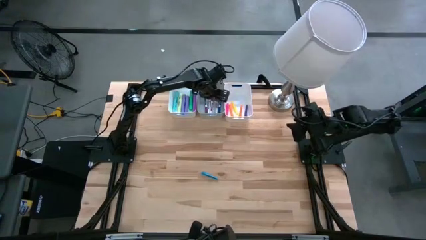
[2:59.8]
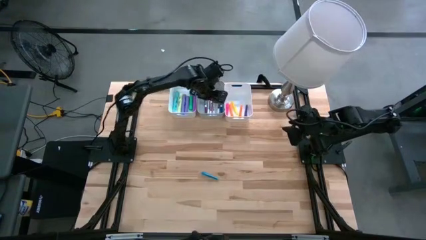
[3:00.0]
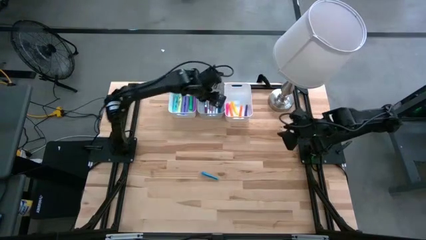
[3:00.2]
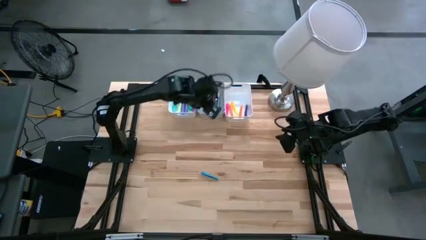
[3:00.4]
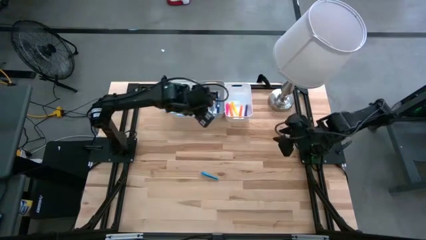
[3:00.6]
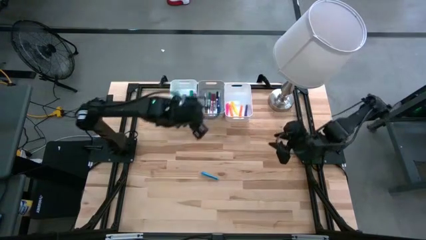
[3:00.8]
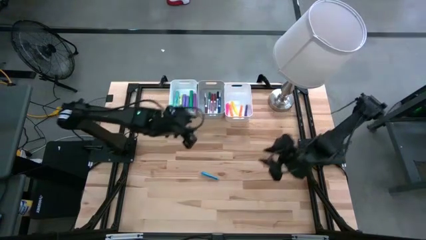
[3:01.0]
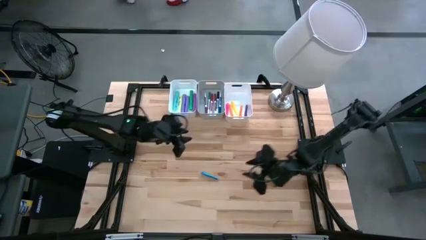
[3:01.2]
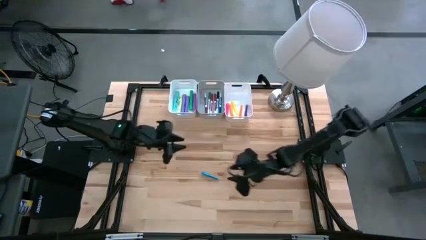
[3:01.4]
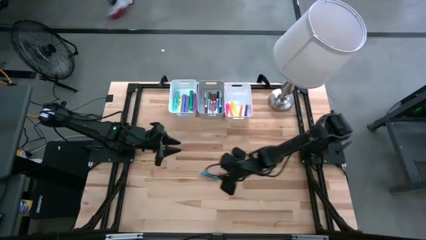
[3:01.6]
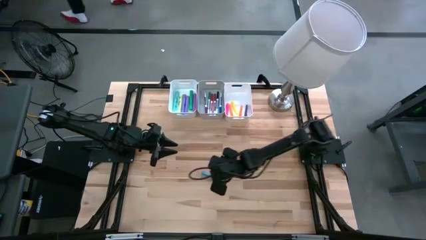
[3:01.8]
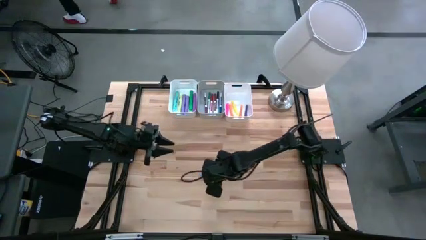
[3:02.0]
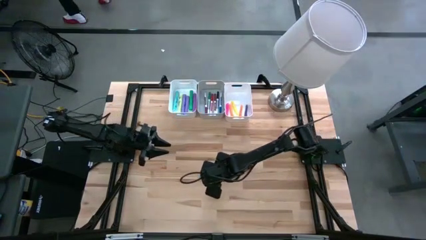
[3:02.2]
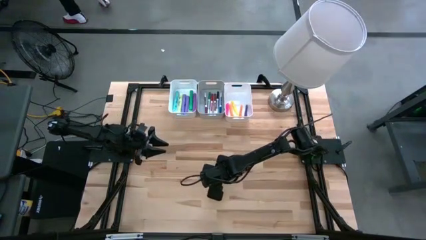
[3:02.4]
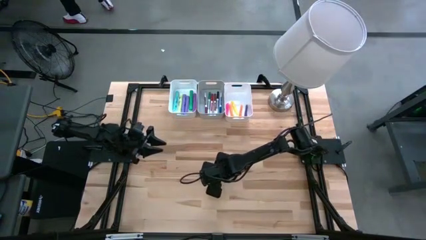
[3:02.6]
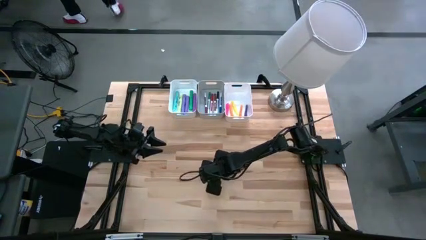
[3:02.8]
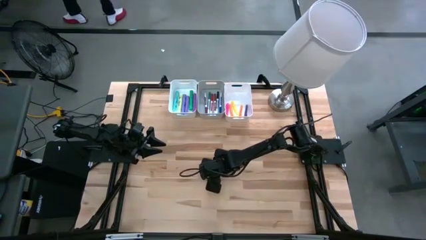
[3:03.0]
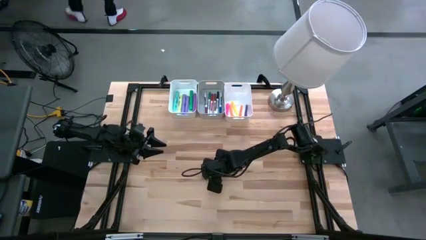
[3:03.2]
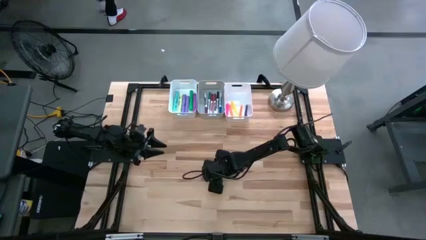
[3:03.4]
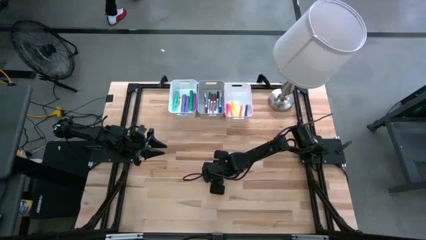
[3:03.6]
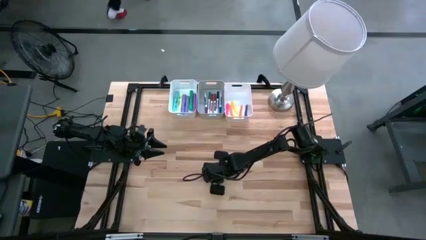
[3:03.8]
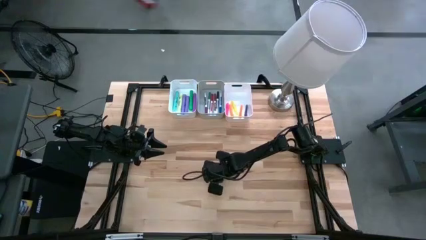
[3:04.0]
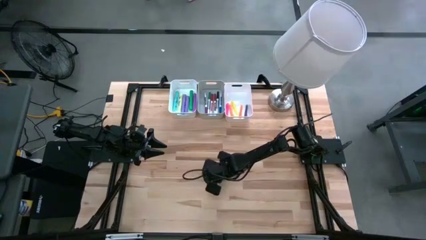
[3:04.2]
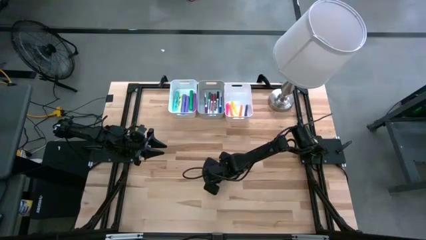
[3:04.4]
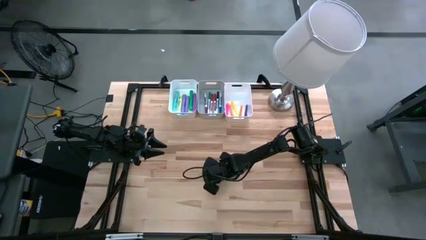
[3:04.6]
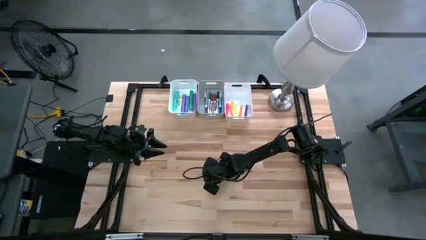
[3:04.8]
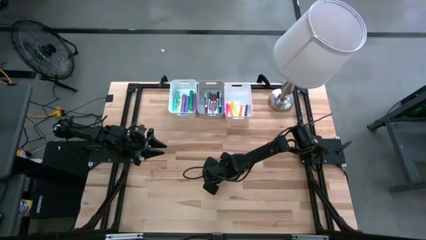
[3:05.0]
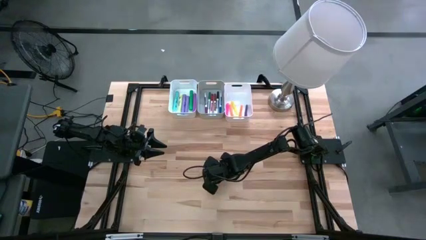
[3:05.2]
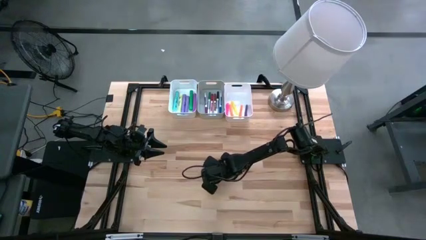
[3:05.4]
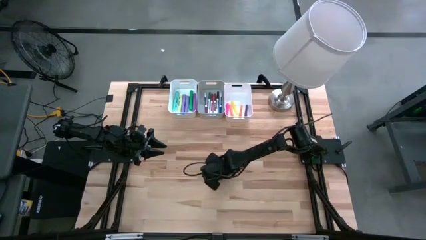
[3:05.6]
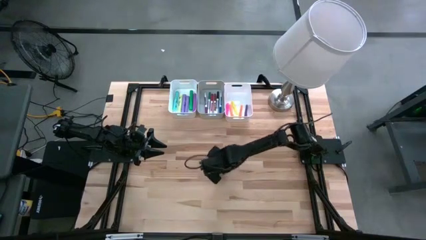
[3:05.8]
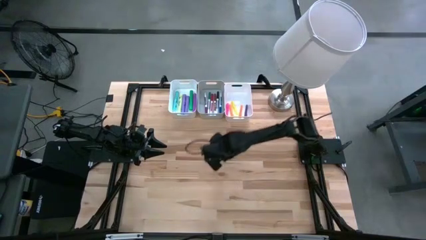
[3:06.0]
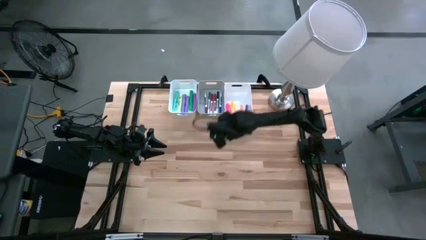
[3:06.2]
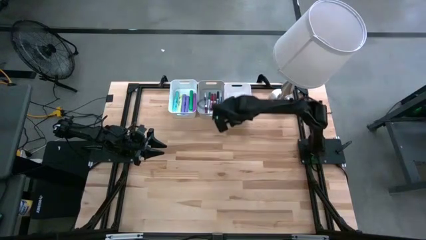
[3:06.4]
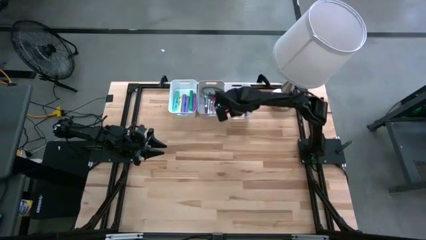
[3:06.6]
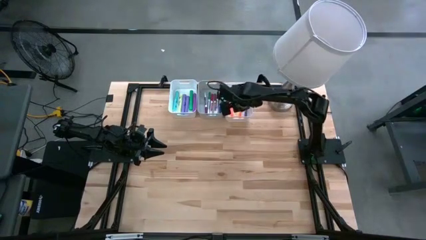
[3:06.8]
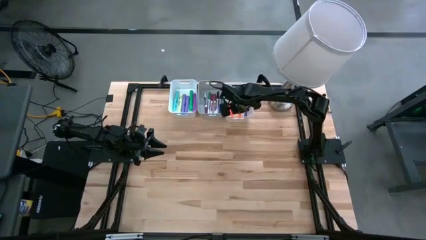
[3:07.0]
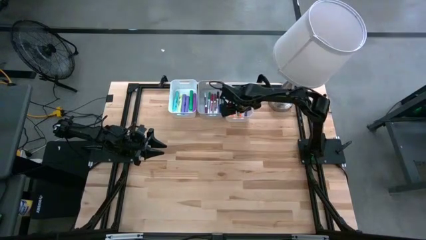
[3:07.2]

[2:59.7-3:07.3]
Task: Pick & Place Markers
Put the blue pen into the right white bin

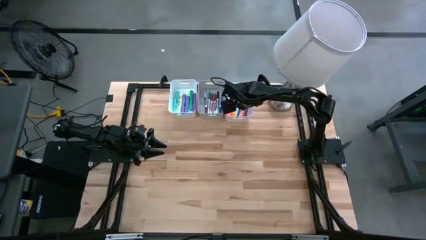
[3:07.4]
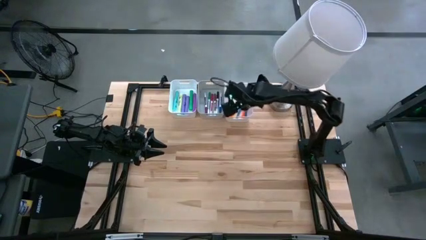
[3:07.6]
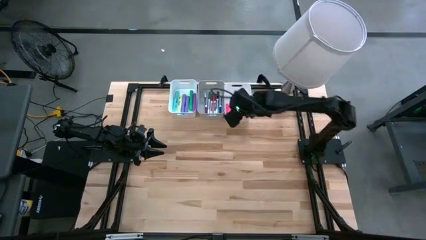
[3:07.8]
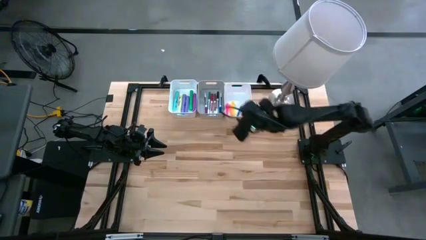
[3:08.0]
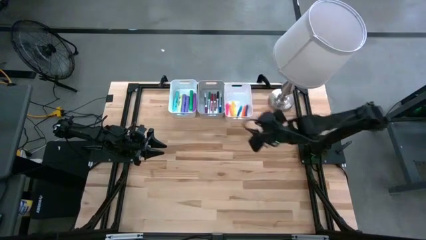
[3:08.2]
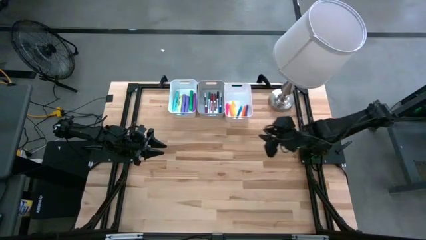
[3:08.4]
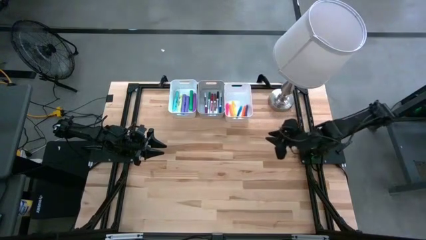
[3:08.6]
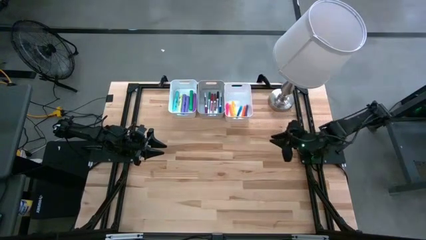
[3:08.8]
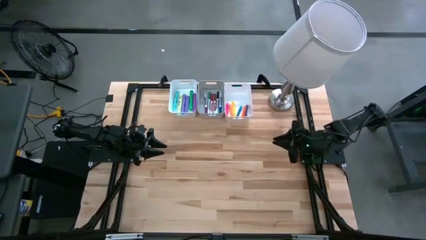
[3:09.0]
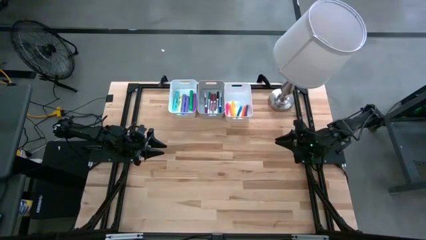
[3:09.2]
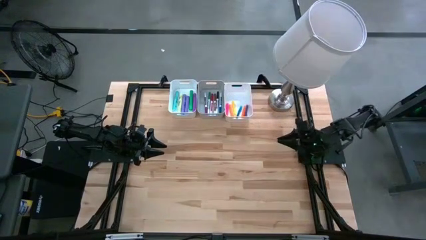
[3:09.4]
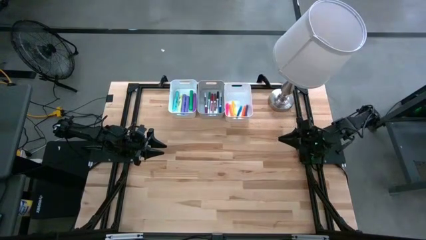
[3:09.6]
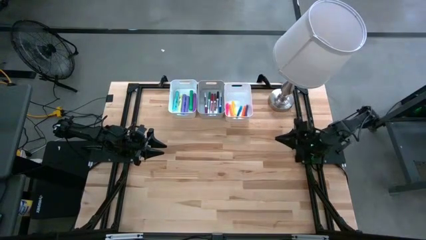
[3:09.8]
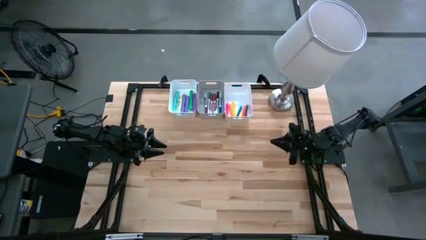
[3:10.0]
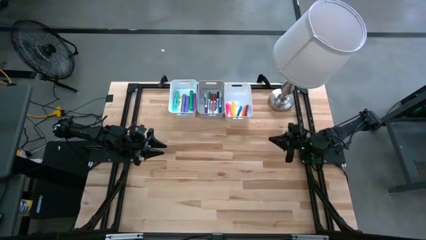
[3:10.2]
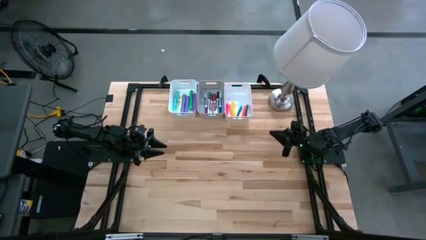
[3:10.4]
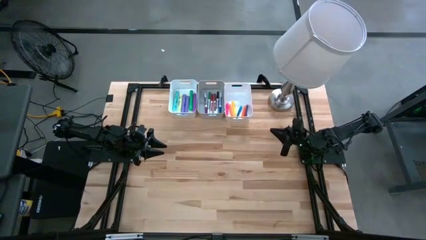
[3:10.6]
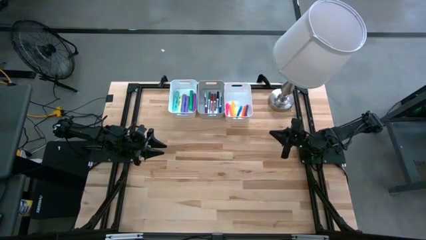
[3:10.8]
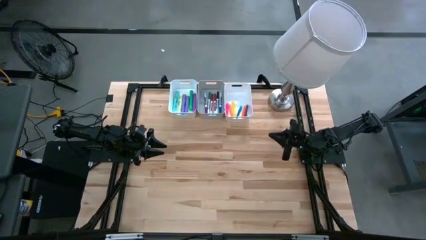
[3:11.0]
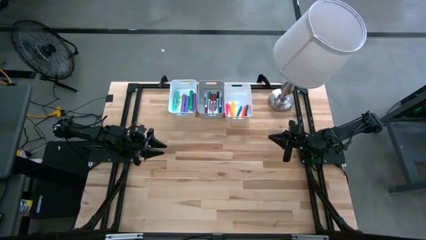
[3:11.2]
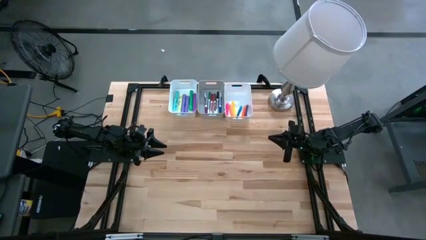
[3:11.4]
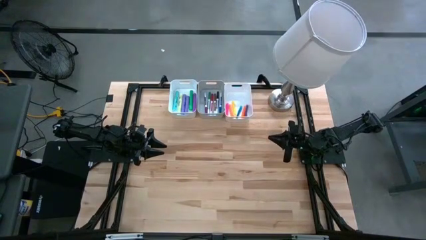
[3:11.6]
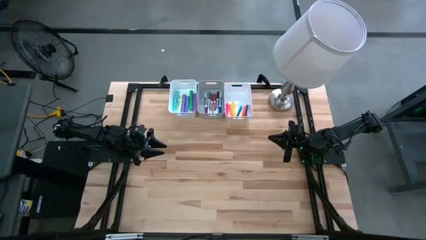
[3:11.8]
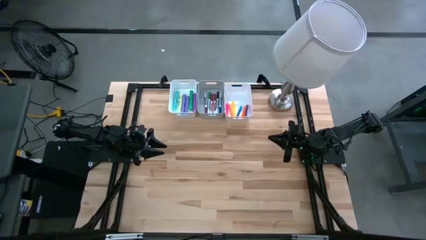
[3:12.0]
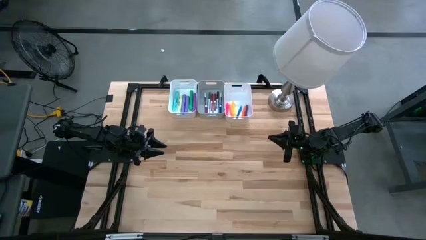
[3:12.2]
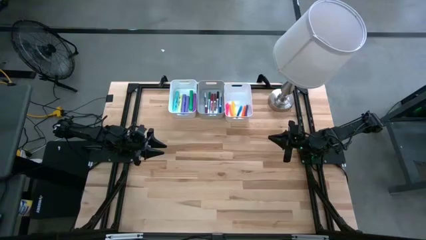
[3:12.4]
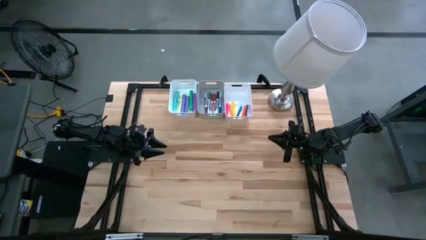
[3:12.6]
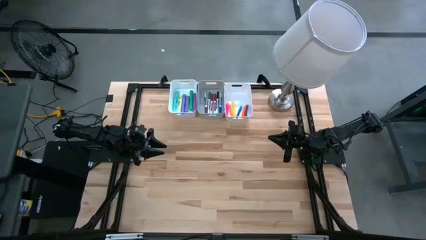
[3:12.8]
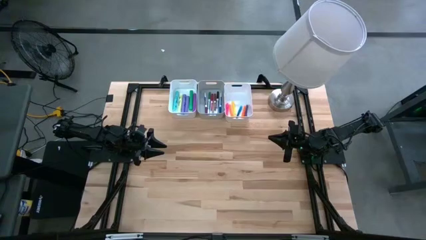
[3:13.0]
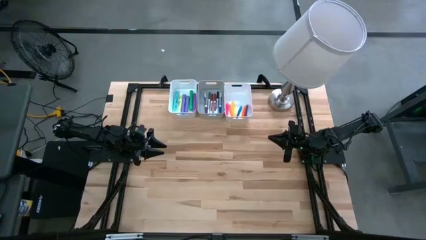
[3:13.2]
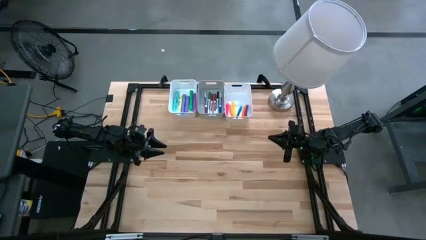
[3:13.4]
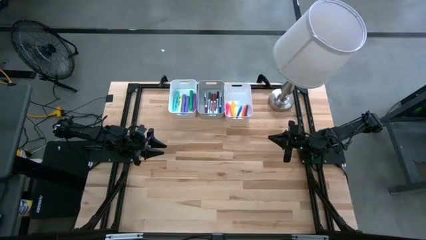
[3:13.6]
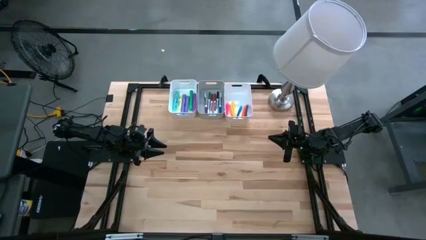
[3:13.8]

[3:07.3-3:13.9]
Return to Home Position

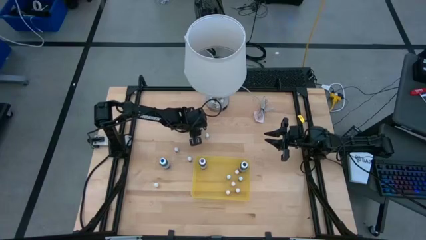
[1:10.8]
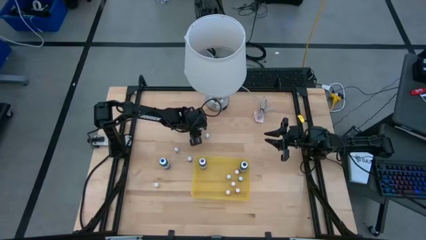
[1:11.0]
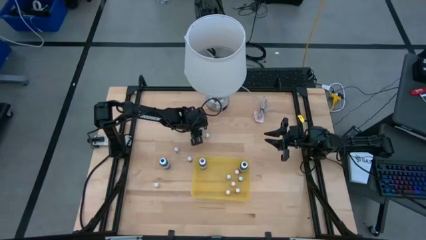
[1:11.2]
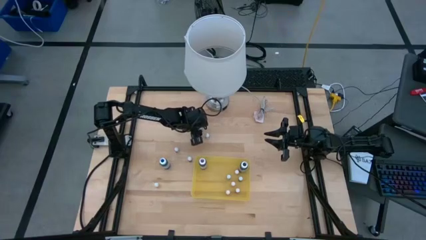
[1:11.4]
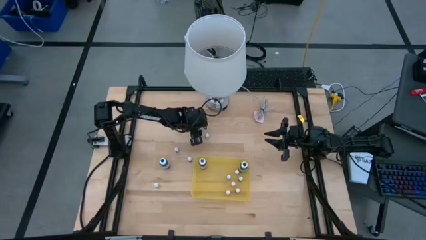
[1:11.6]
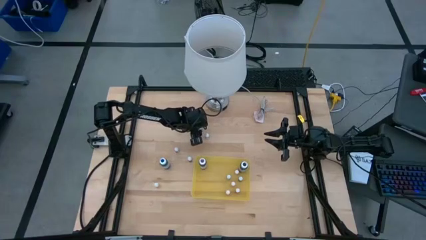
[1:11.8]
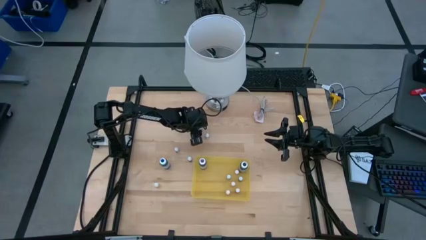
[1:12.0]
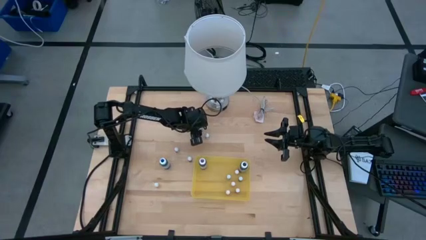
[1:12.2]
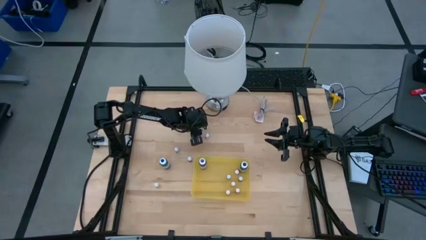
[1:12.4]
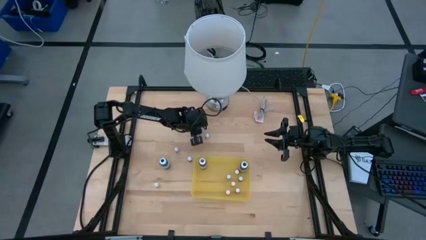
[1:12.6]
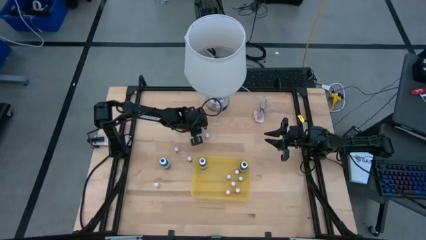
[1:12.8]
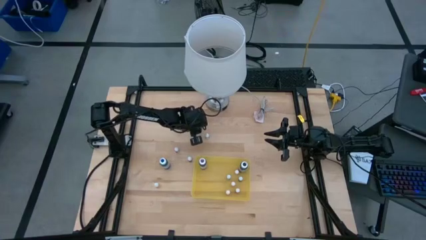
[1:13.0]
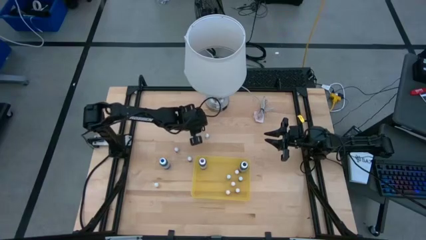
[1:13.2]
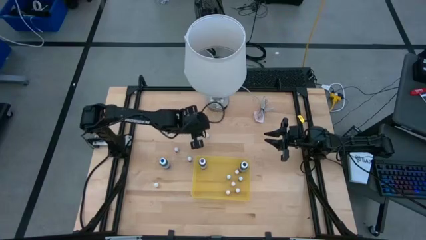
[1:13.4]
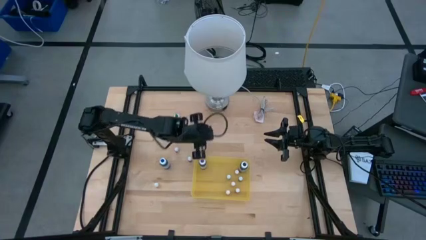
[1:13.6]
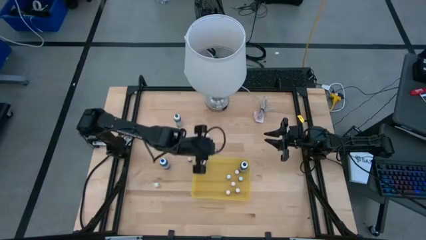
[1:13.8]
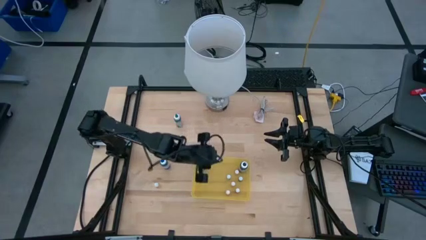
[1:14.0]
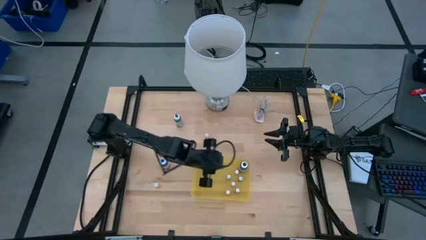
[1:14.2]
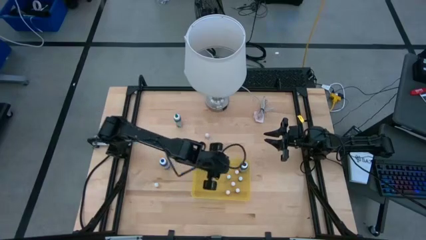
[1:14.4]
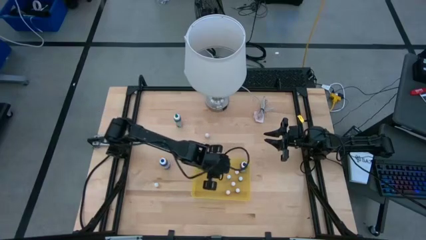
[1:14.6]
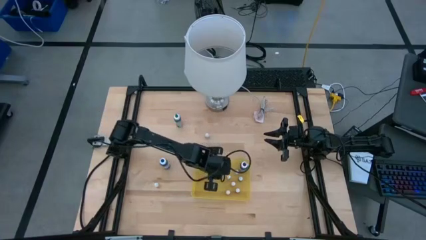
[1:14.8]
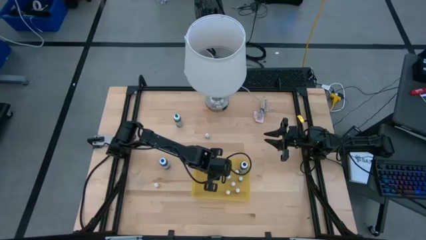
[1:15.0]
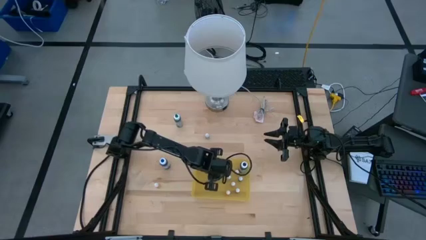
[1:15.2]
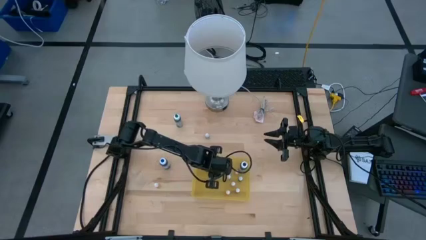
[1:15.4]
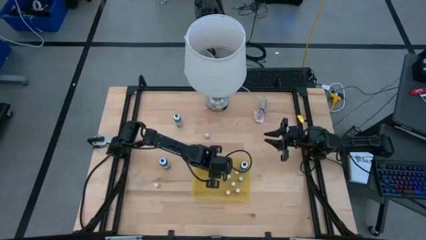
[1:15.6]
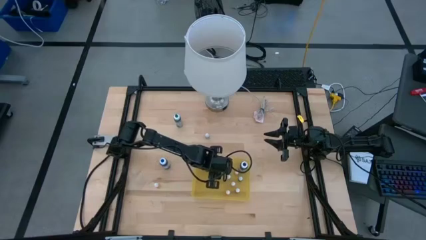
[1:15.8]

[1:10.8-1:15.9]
Task: Pick & Place food coloring
Put the small blue food coloring bottle into the transparent bin
